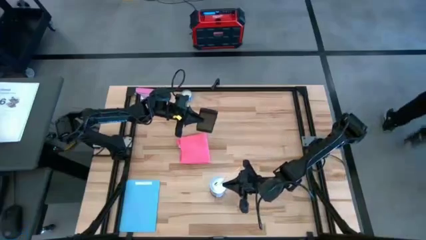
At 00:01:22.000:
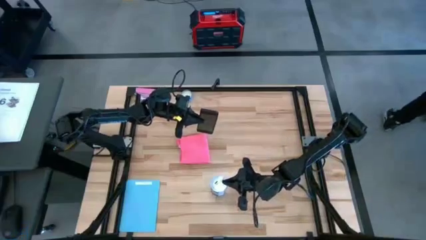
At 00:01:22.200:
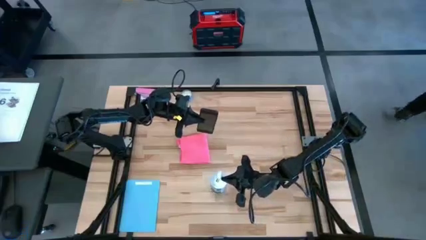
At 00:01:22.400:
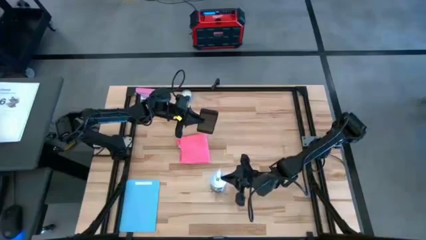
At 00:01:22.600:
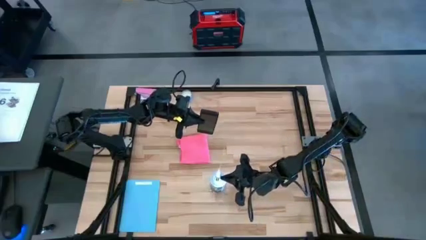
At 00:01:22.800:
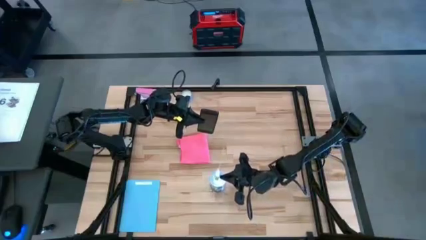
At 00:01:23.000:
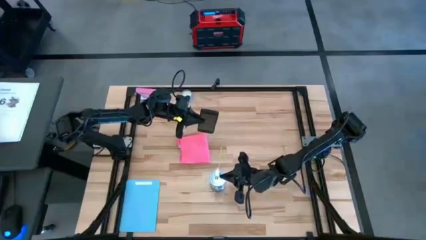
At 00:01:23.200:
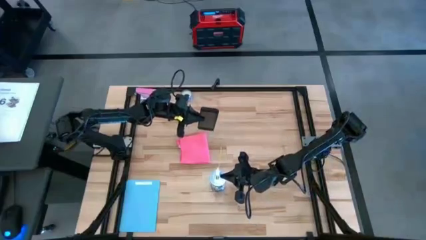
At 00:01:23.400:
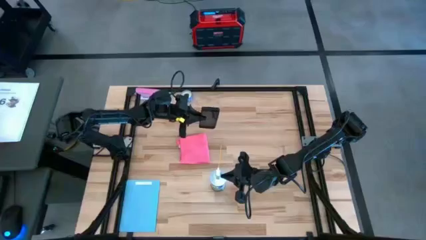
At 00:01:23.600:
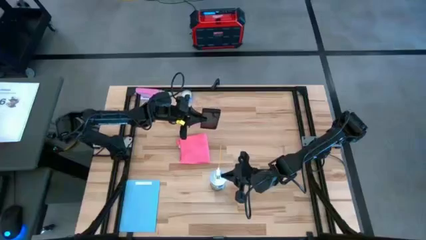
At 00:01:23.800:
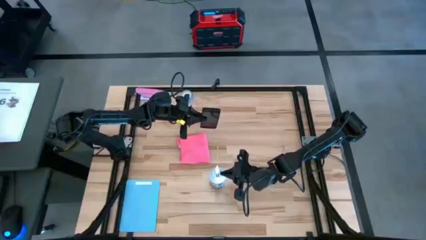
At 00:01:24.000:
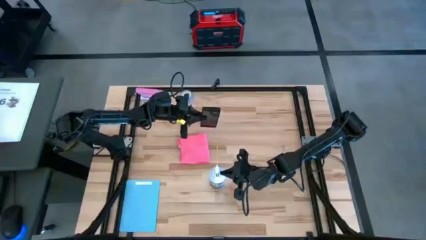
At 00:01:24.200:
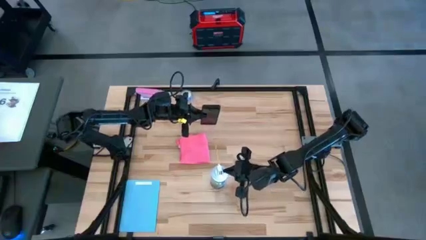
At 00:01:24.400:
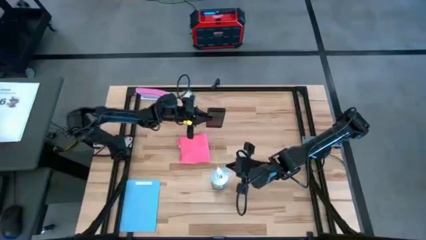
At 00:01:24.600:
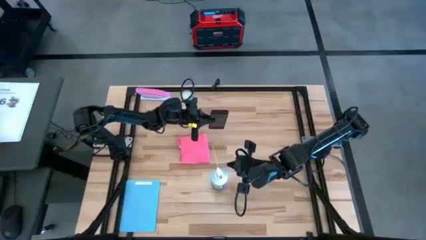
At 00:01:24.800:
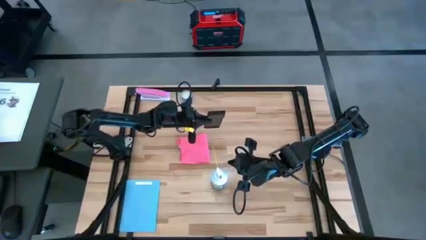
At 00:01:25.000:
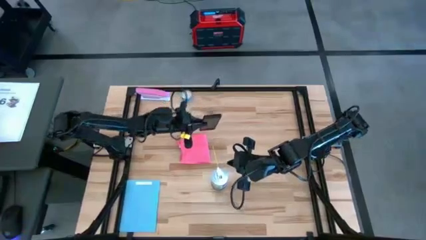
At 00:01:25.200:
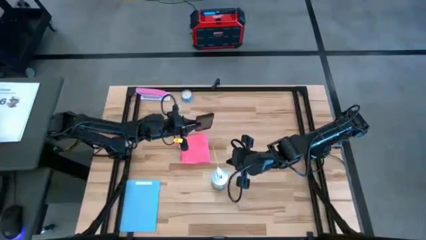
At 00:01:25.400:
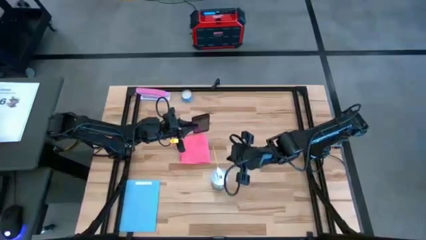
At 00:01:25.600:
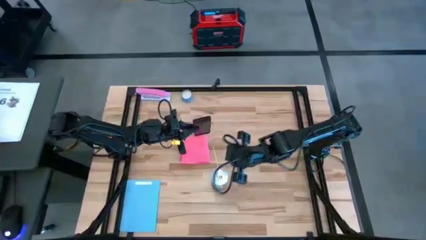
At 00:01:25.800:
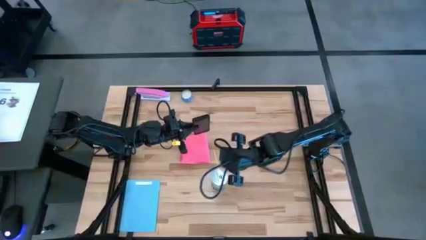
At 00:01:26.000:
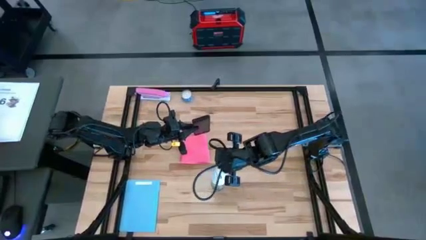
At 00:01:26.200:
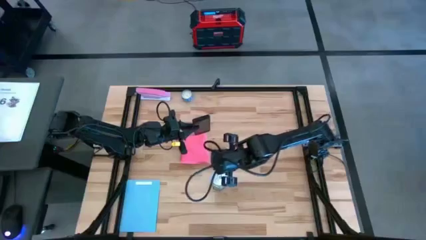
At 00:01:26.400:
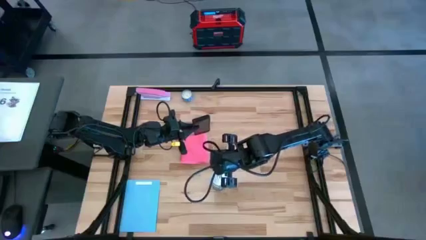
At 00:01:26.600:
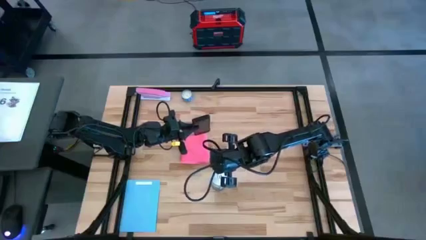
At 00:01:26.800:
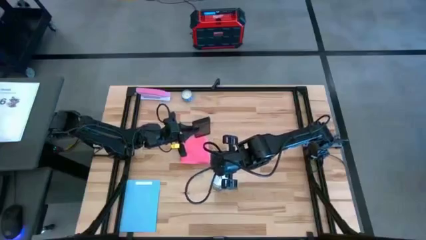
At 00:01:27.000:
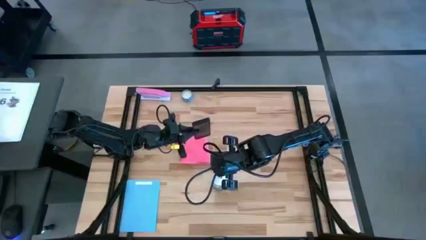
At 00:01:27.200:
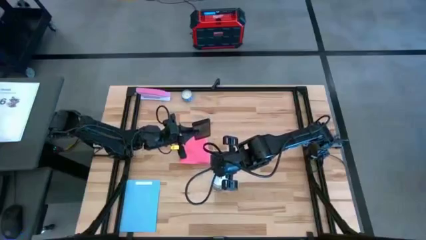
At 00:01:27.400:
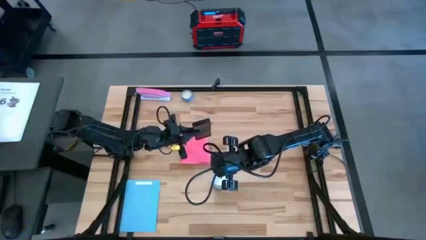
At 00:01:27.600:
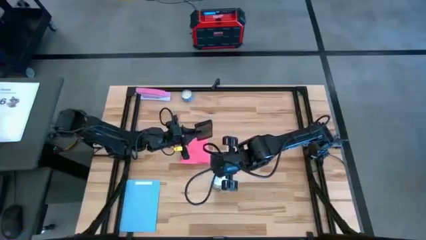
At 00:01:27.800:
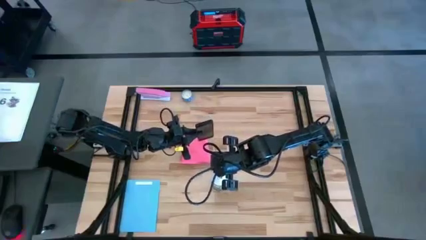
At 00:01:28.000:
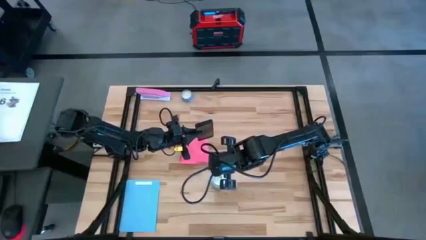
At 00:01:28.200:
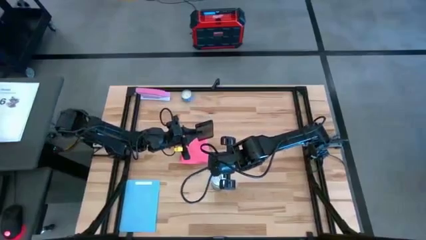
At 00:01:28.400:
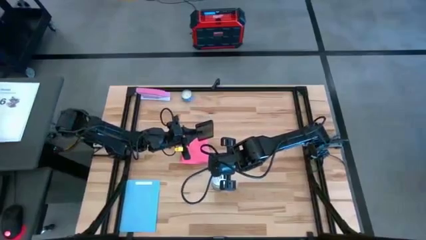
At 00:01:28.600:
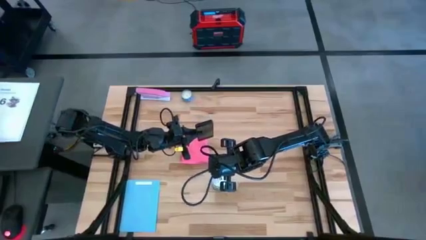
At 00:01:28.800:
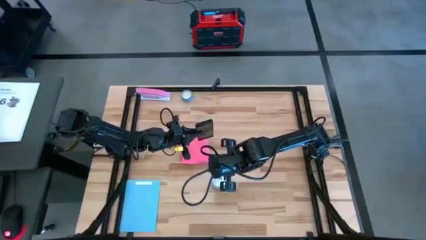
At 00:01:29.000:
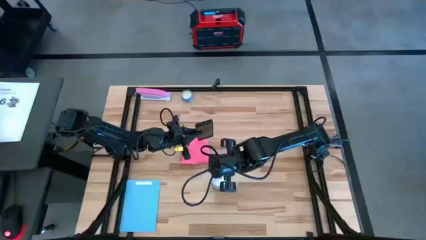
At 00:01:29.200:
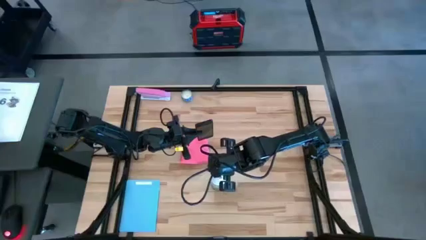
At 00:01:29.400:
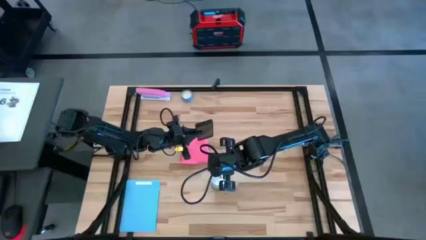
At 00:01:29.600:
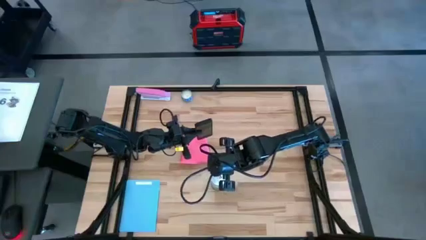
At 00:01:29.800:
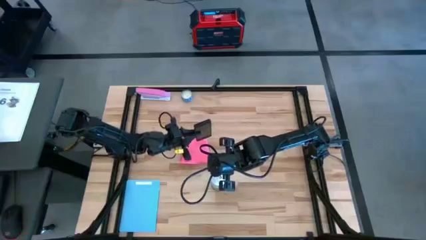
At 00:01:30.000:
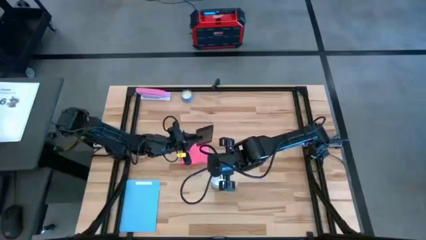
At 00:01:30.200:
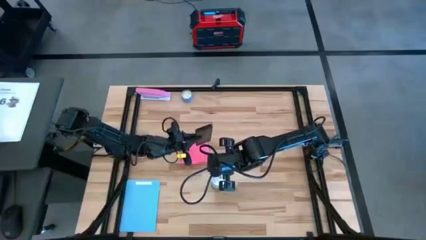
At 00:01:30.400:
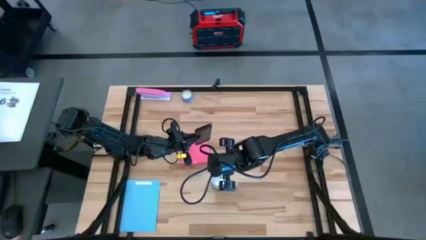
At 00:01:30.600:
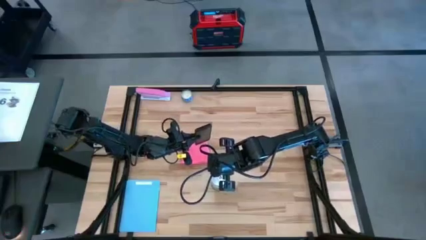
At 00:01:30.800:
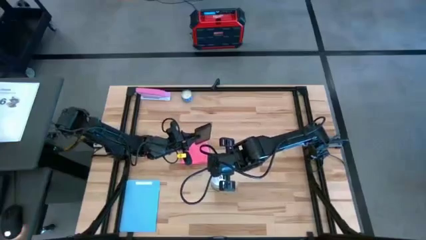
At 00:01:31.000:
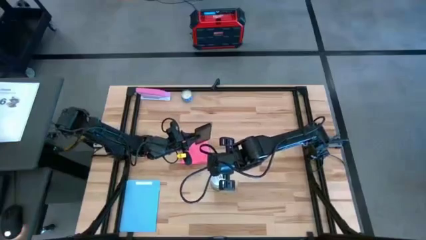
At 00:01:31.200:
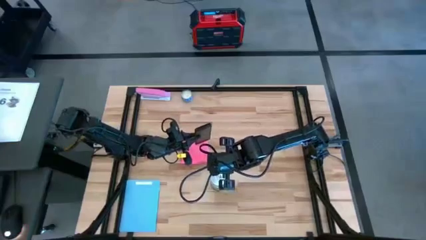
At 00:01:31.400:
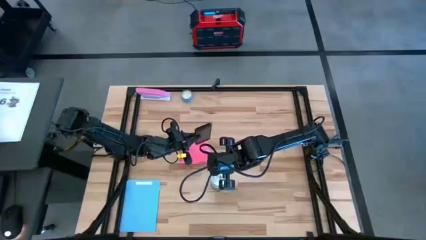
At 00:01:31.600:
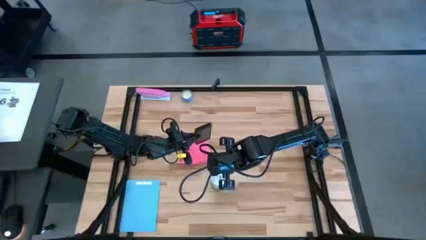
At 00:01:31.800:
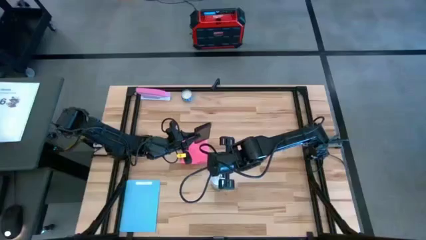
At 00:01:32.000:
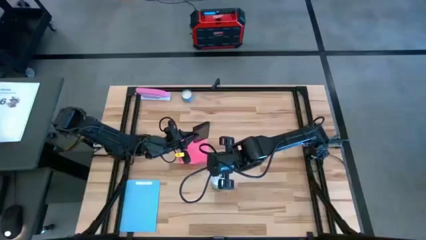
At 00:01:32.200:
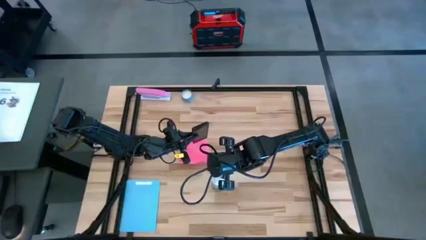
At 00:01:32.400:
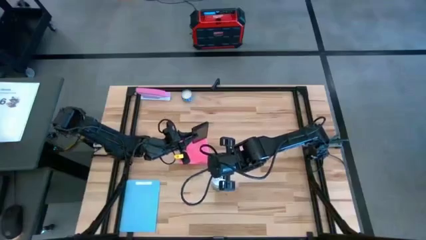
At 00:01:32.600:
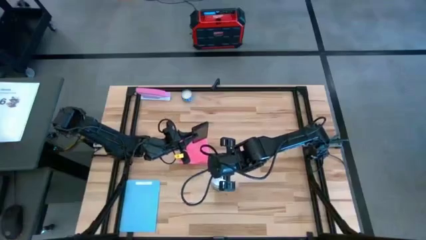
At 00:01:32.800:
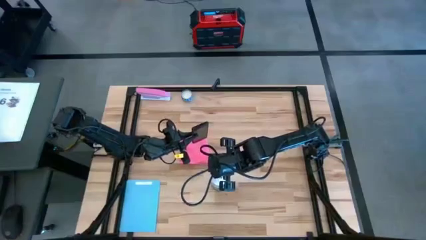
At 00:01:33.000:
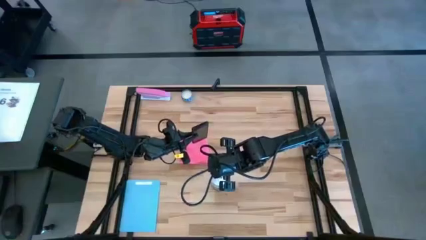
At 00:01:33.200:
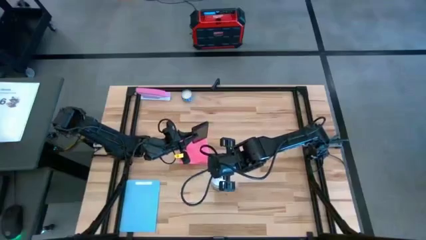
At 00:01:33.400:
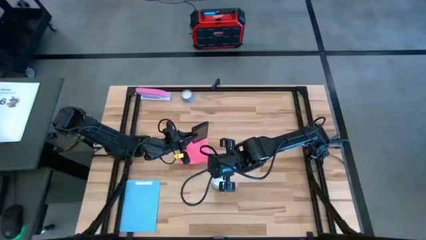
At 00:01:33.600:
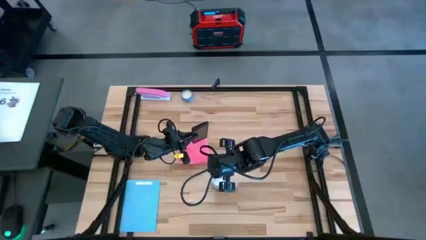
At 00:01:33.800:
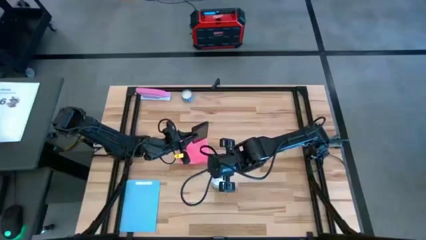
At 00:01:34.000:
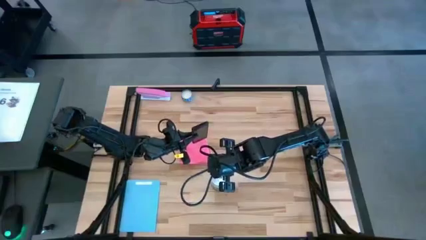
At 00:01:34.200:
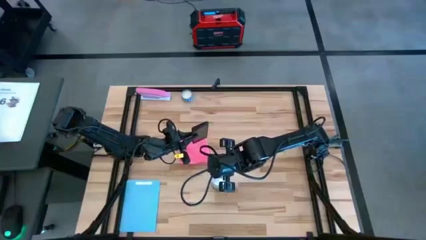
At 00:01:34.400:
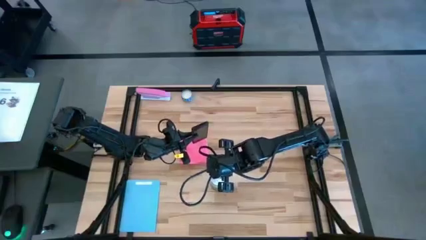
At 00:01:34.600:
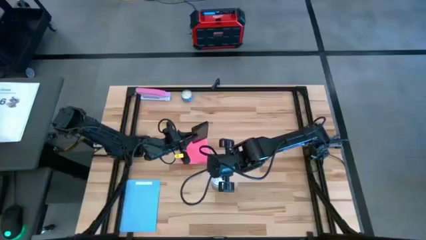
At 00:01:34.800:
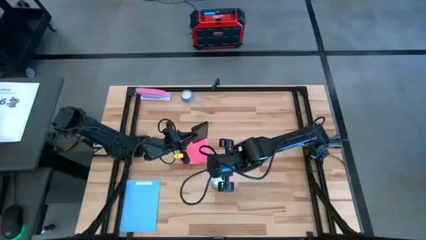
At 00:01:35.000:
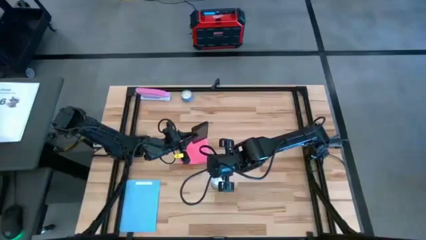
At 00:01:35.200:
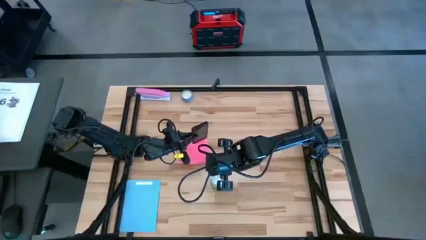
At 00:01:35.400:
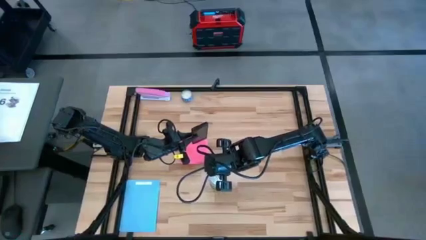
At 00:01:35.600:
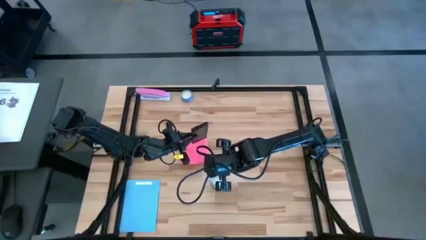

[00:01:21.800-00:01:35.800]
Task: Apply microfiber cloth
Spray the front of the black cellphone using the spray bottle
